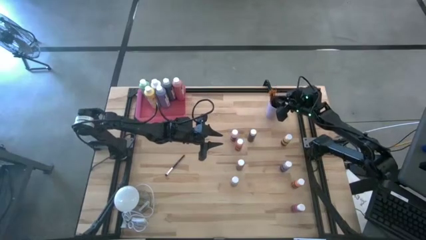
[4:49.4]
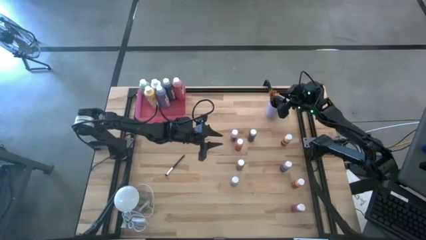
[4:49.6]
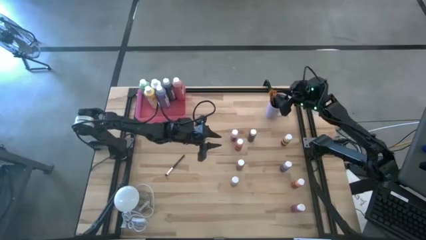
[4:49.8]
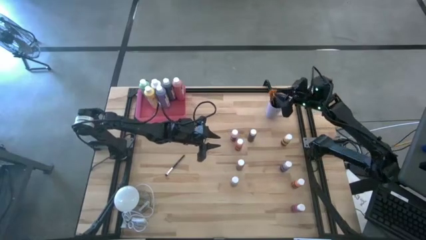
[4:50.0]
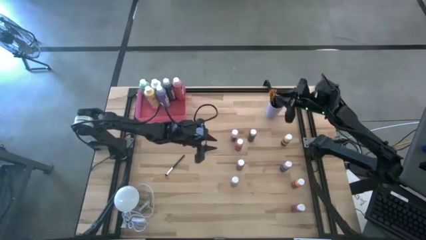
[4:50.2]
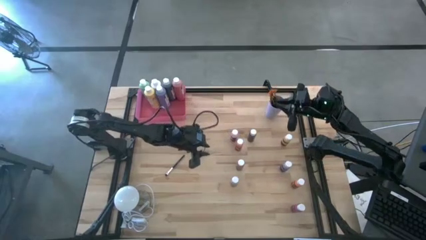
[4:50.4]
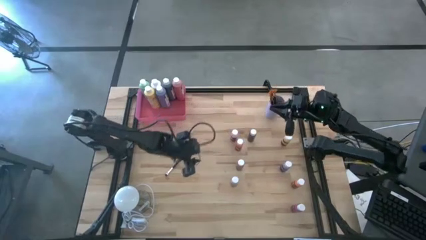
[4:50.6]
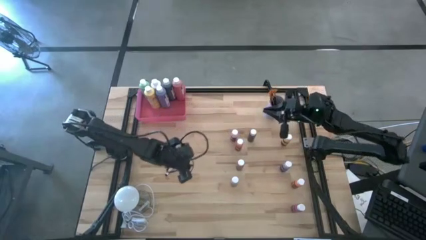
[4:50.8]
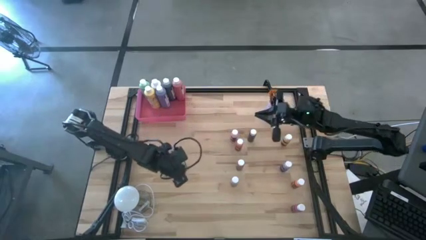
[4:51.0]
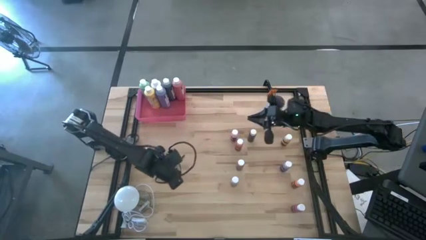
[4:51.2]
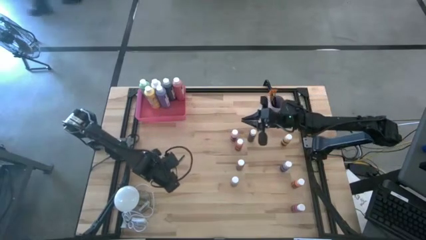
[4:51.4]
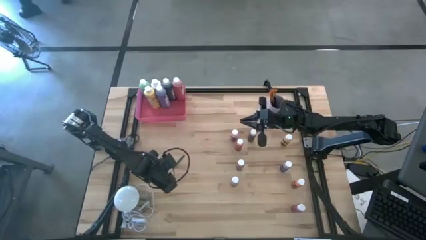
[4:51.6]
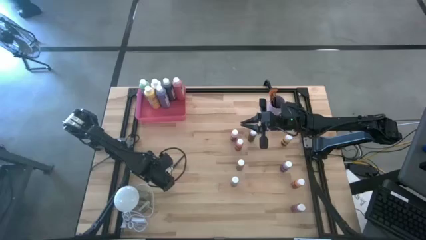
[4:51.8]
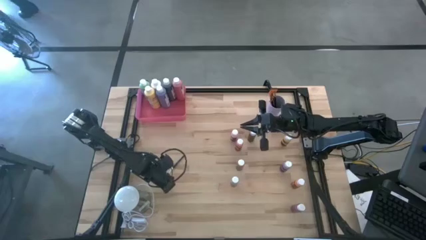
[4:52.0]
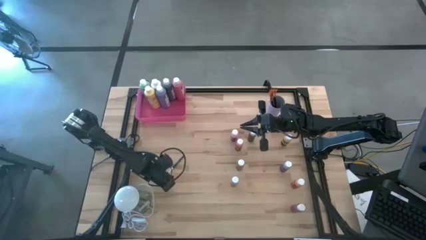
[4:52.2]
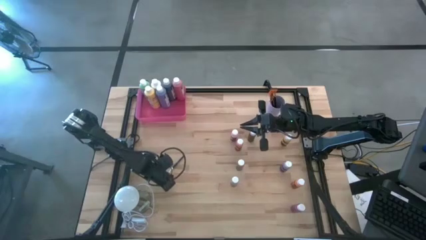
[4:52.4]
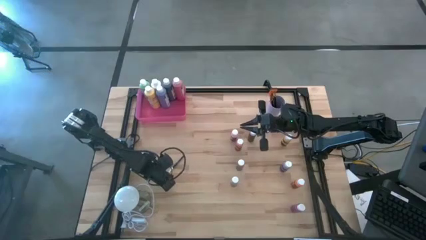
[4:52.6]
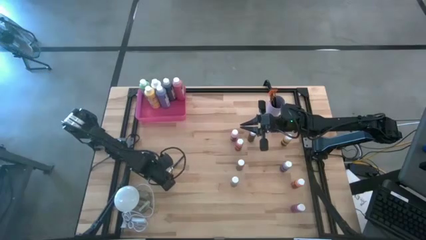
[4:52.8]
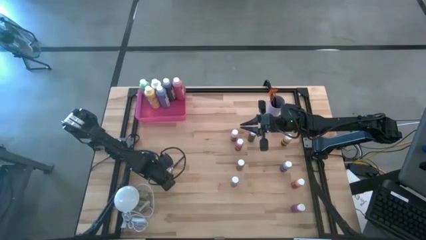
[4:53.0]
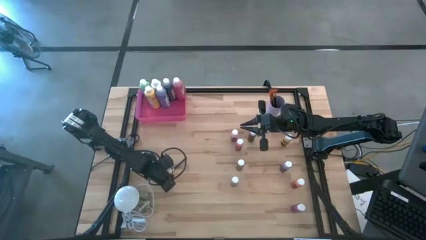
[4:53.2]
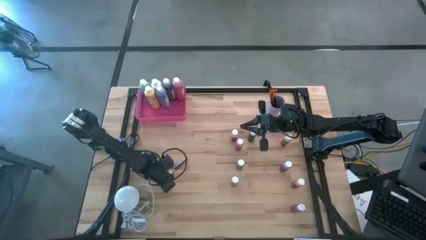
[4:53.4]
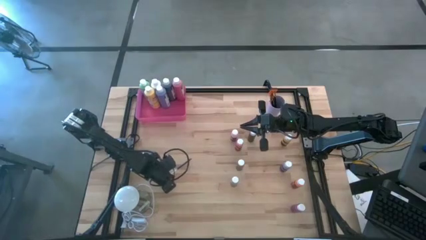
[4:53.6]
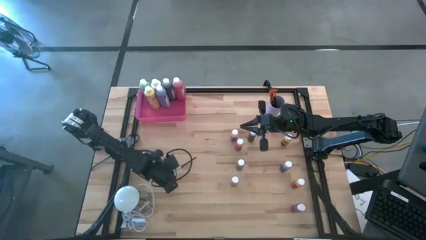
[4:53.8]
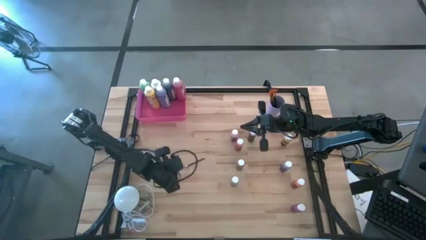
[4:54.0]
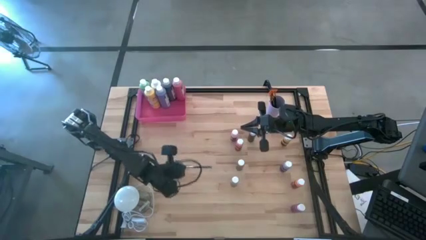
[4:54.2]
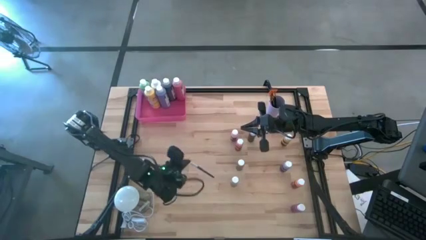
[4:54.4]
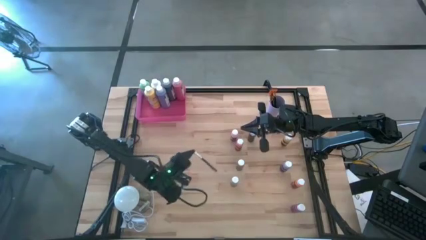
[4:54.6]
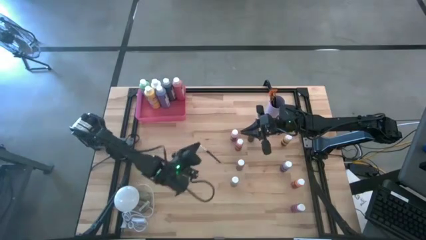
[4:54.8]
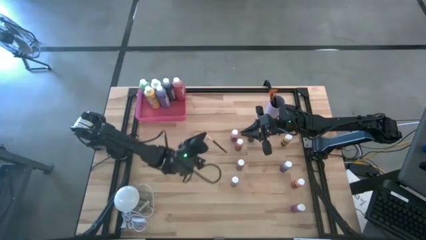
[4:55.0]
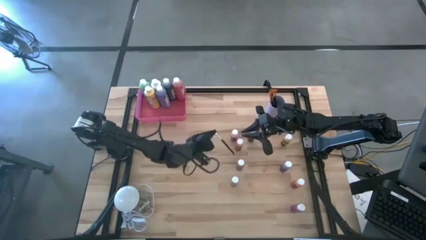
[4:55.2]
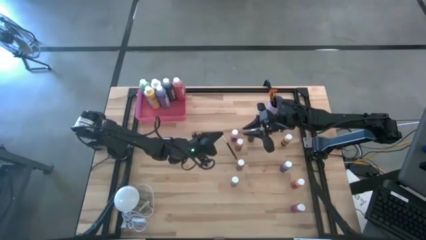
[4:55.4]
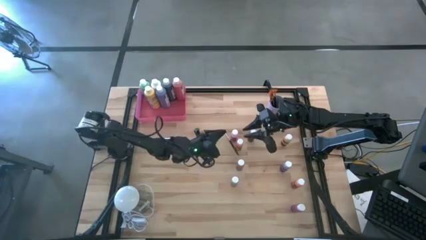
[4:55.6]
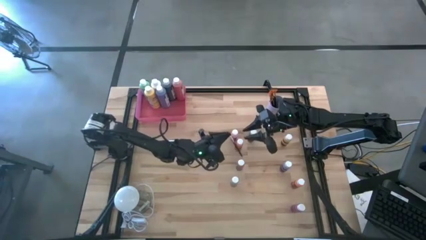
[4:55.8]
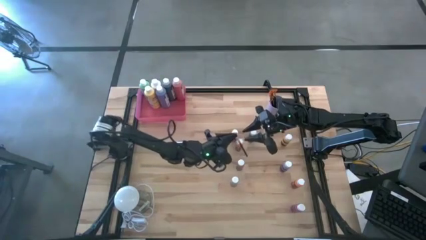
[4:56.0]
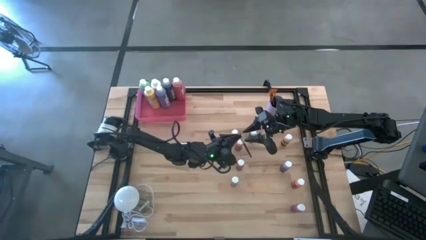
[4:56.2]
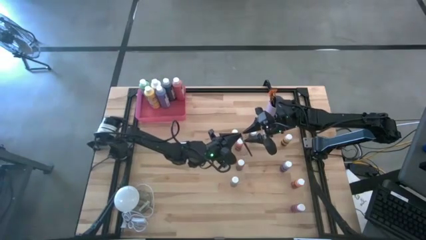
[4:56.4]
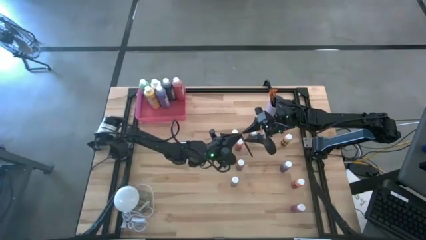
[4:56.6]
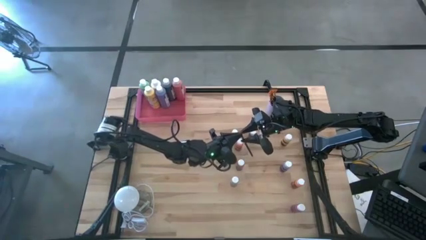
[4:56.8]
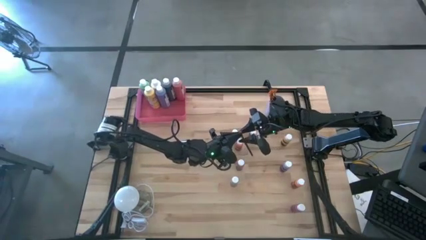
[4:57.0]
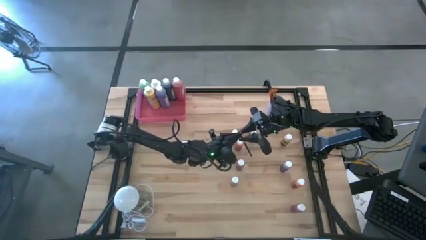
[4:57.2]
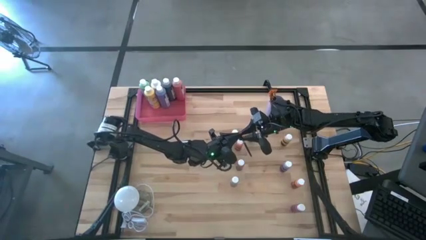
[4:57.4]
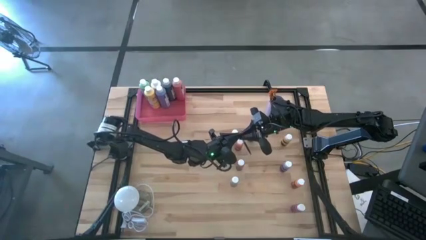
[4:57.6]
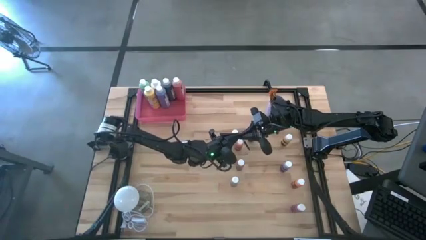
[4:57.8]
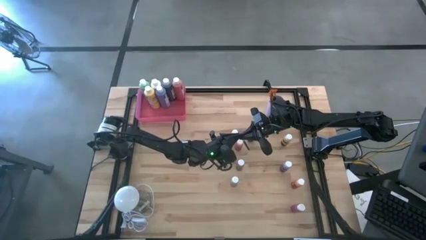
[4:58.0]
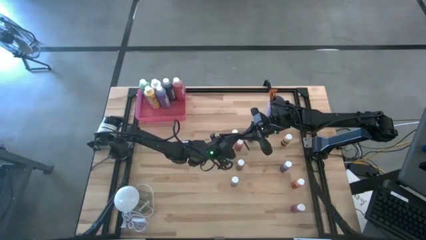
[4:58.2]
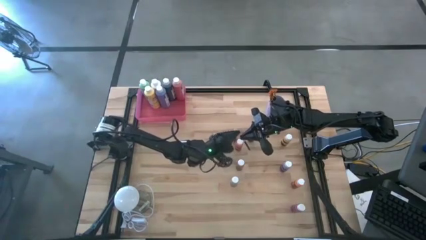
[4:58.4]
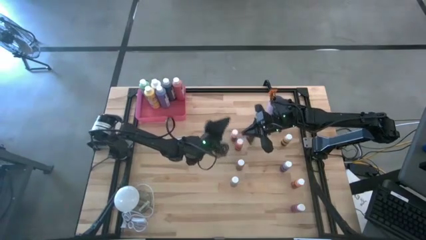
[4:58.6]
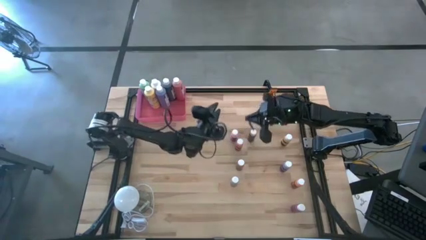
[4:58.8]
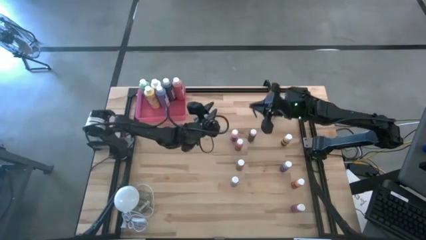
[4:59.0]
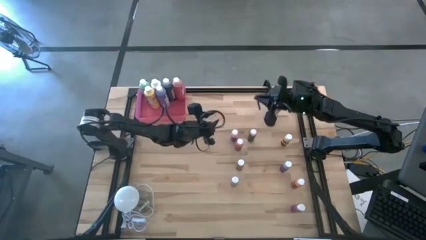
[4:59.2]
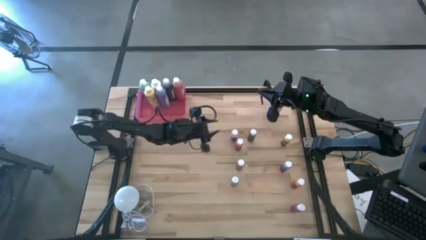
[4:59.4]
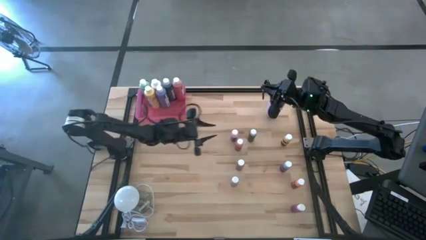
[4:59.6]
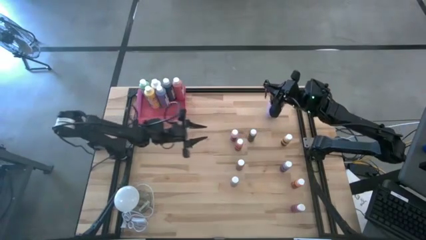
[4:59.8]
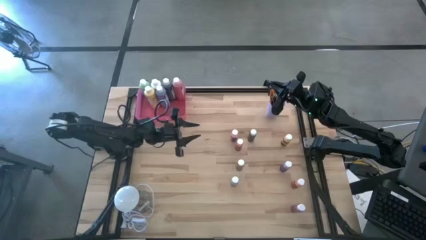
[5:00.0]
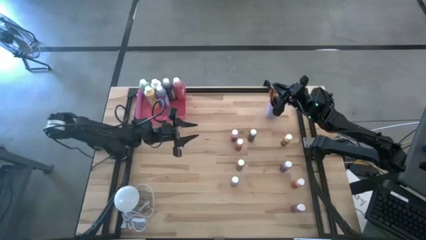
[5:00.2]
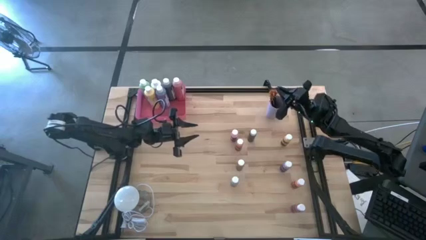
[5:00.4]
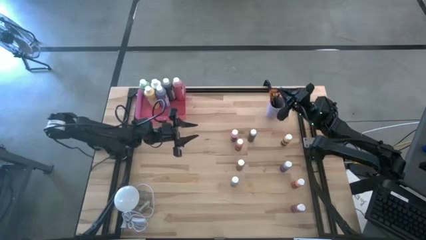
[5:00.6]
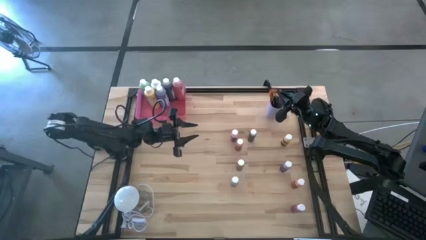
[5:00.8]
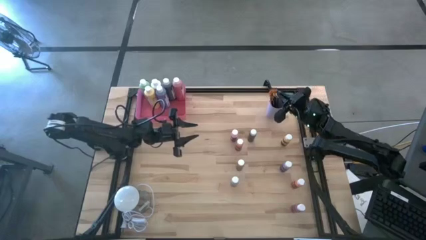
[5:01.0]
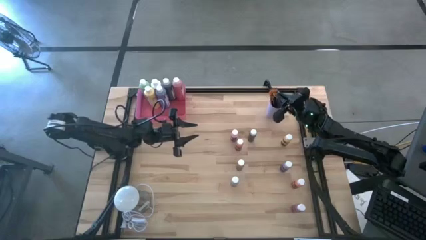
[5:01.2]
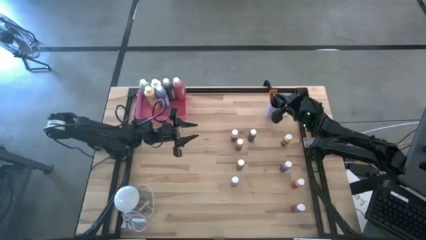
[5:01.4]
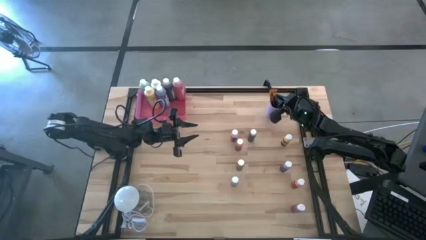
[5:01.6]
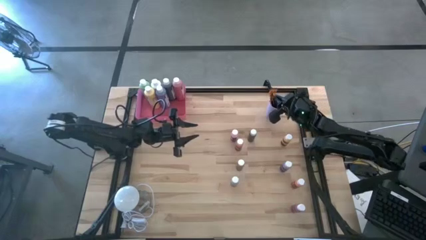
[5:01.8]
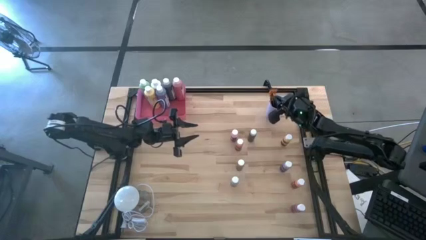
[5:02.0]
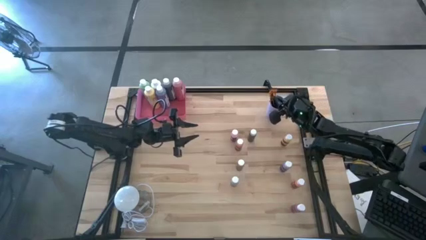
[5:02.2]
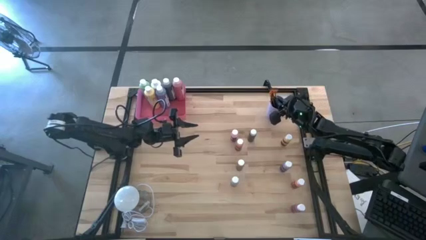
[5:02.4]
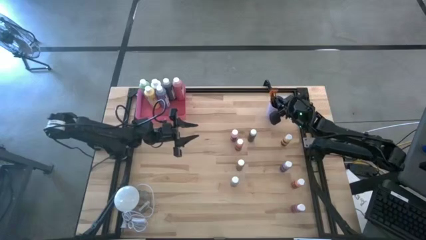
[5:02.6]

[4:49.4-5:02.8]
Task: Pick & Place Paint Supplies
Put the silver paint brush into the purple cup
